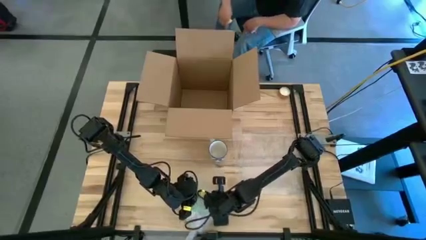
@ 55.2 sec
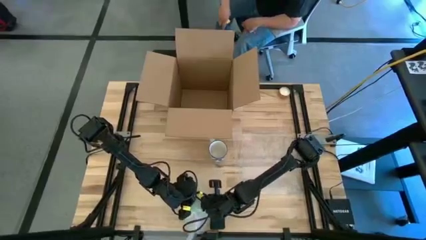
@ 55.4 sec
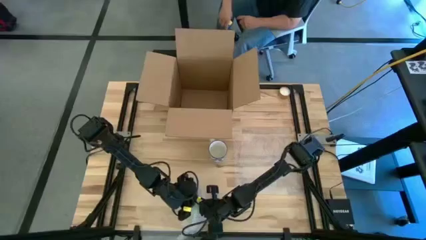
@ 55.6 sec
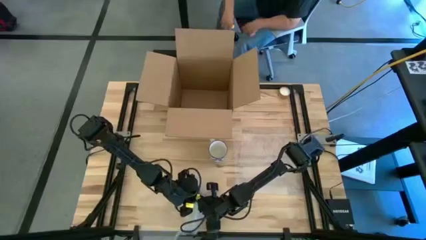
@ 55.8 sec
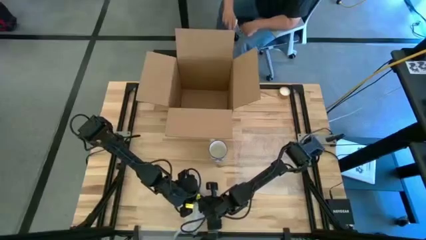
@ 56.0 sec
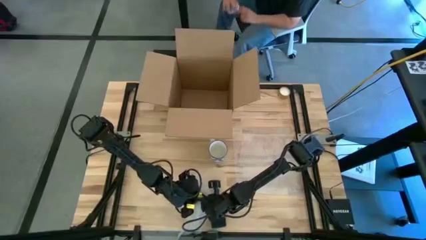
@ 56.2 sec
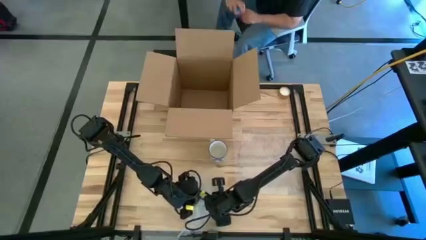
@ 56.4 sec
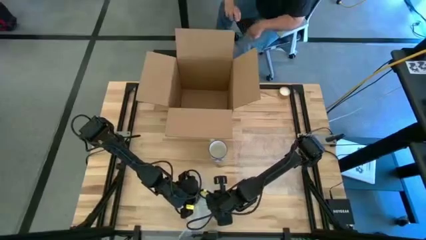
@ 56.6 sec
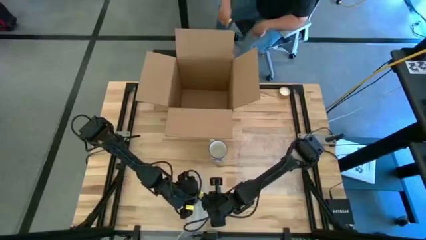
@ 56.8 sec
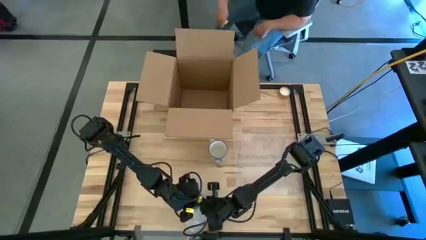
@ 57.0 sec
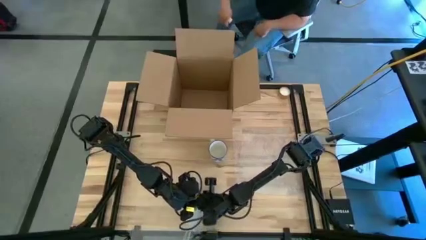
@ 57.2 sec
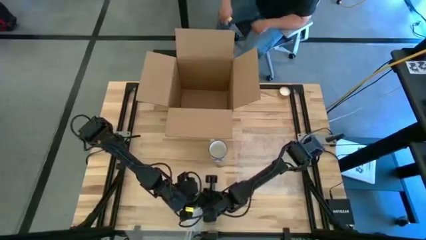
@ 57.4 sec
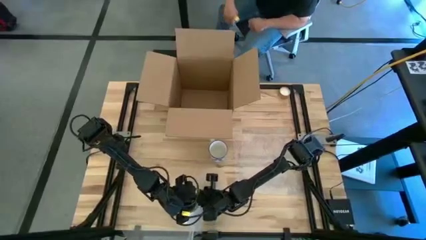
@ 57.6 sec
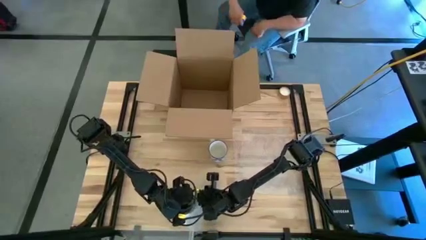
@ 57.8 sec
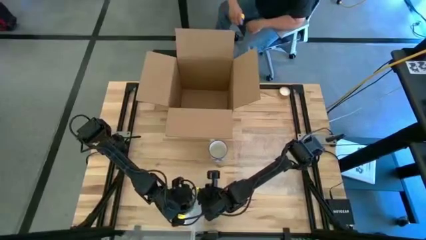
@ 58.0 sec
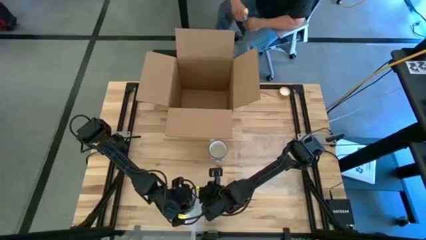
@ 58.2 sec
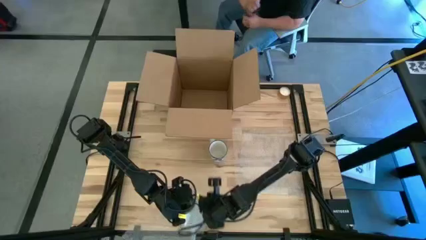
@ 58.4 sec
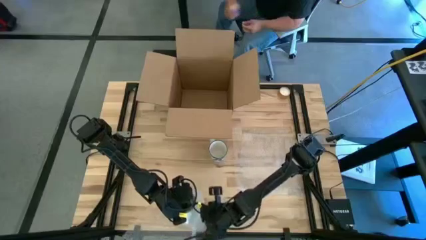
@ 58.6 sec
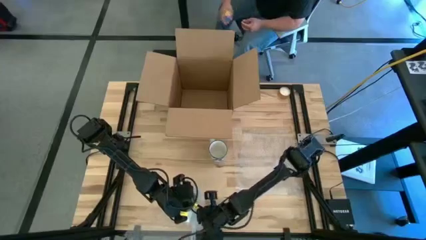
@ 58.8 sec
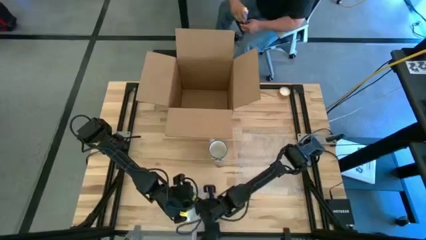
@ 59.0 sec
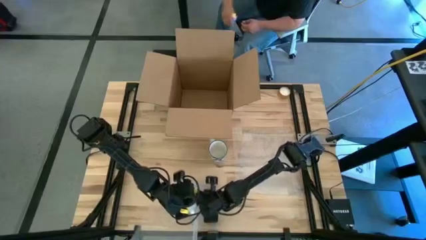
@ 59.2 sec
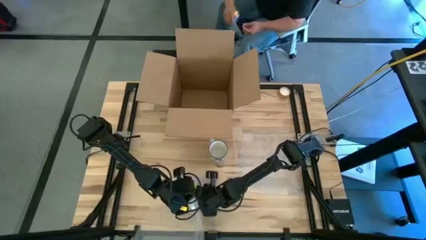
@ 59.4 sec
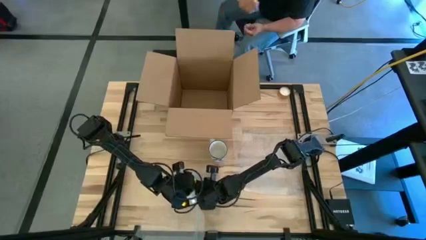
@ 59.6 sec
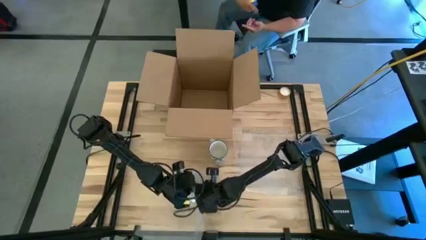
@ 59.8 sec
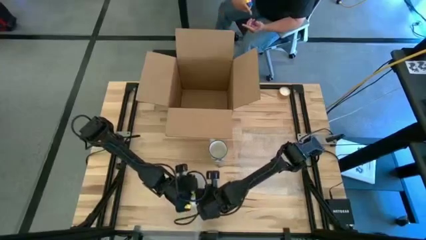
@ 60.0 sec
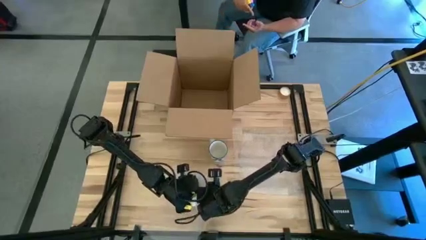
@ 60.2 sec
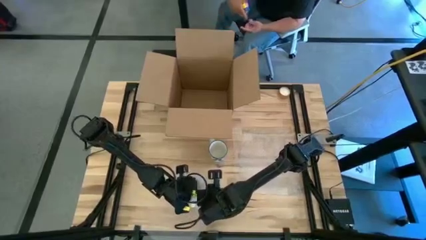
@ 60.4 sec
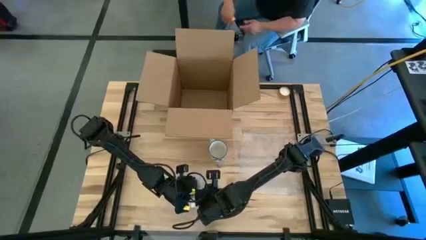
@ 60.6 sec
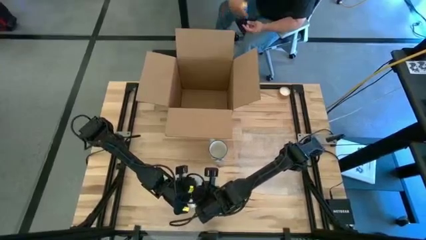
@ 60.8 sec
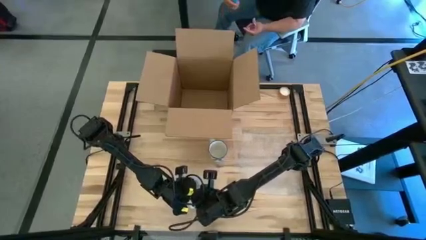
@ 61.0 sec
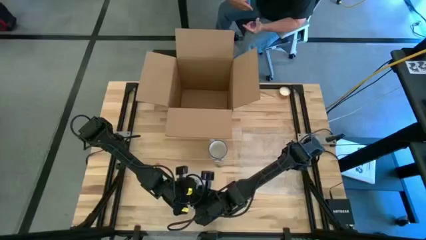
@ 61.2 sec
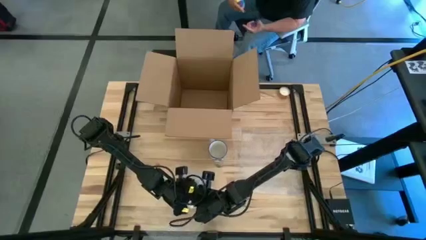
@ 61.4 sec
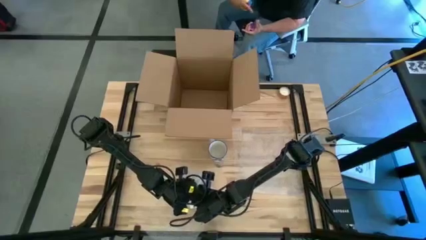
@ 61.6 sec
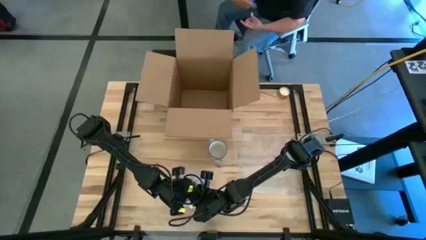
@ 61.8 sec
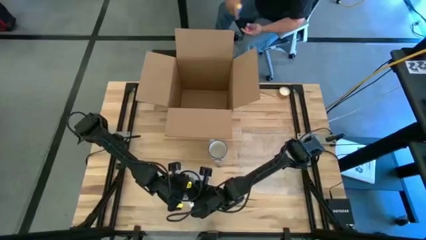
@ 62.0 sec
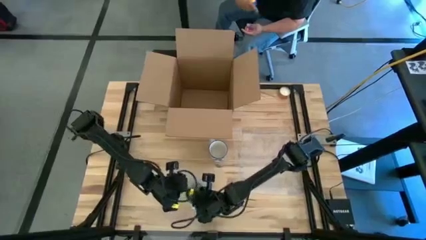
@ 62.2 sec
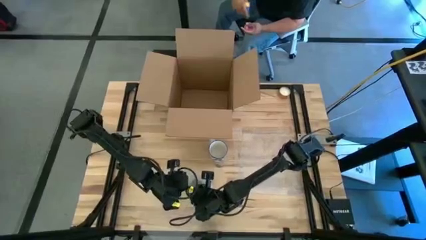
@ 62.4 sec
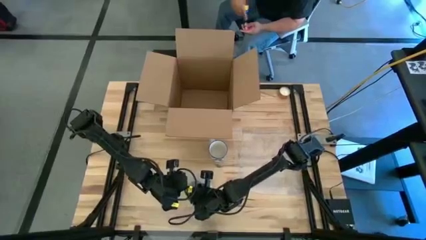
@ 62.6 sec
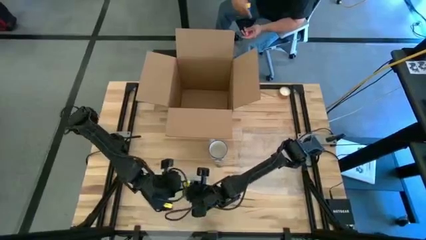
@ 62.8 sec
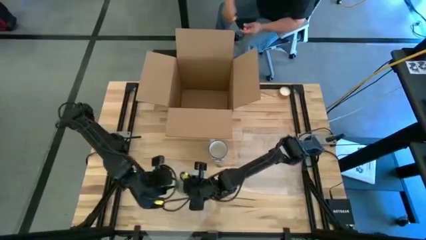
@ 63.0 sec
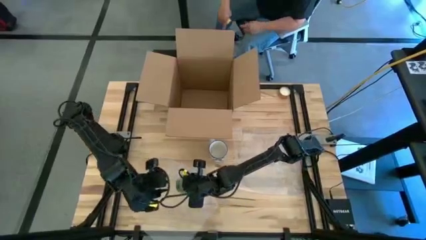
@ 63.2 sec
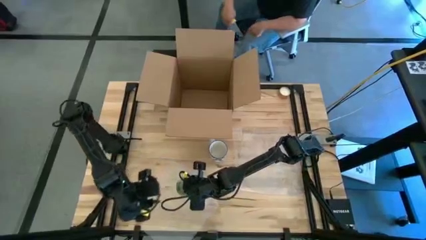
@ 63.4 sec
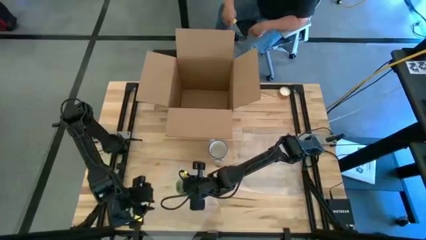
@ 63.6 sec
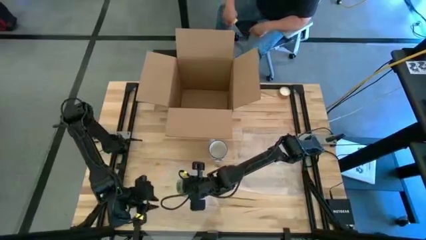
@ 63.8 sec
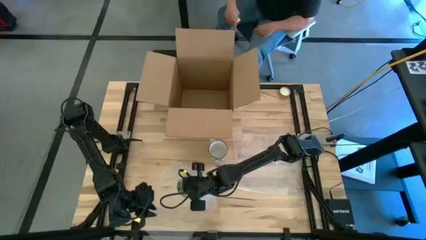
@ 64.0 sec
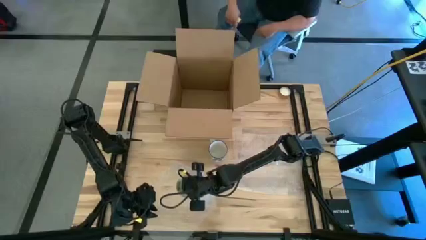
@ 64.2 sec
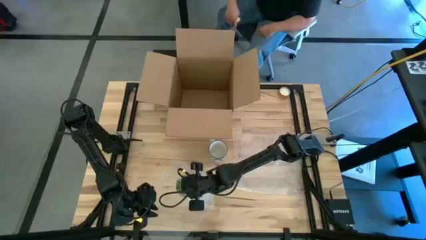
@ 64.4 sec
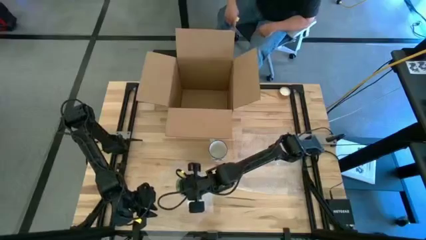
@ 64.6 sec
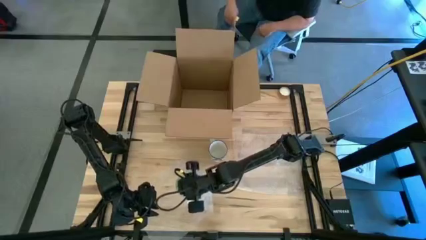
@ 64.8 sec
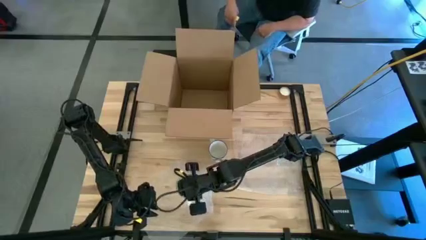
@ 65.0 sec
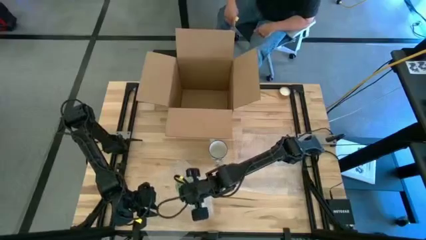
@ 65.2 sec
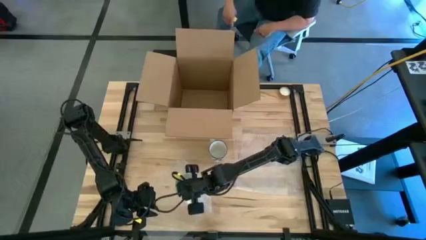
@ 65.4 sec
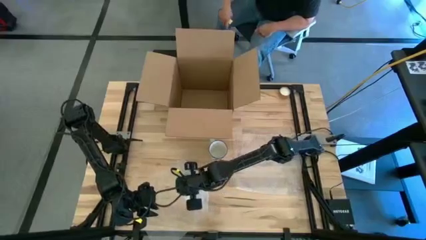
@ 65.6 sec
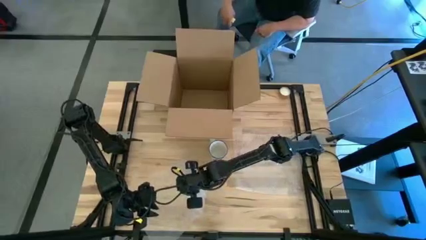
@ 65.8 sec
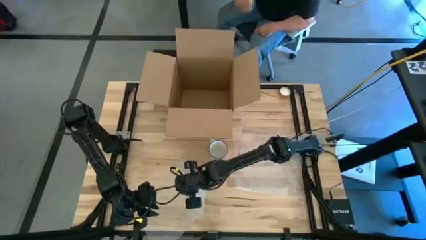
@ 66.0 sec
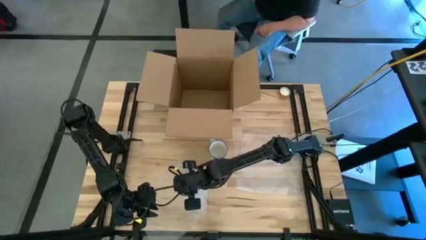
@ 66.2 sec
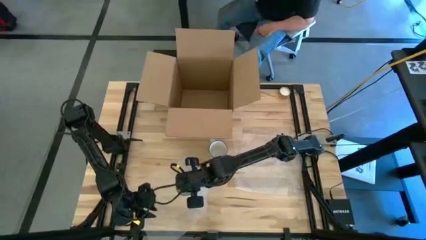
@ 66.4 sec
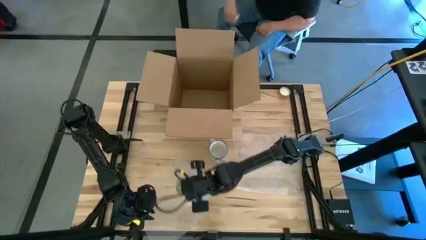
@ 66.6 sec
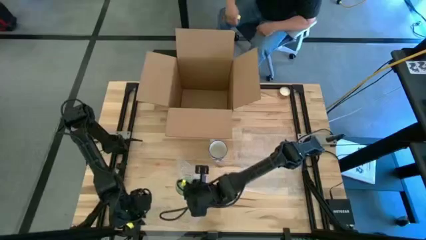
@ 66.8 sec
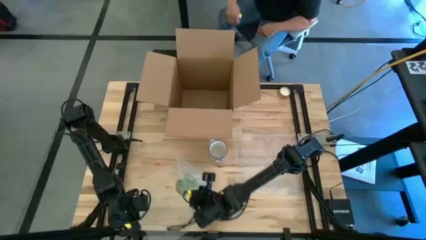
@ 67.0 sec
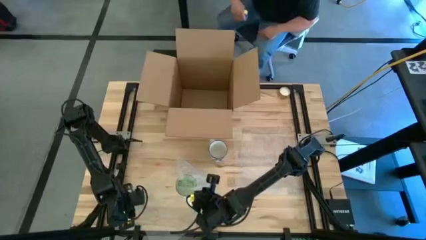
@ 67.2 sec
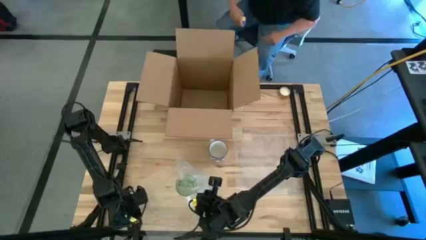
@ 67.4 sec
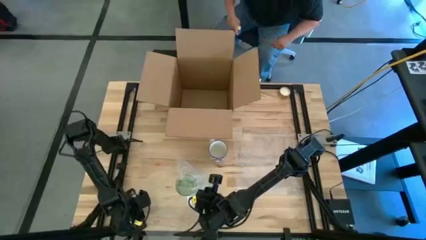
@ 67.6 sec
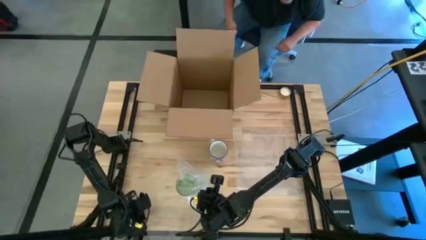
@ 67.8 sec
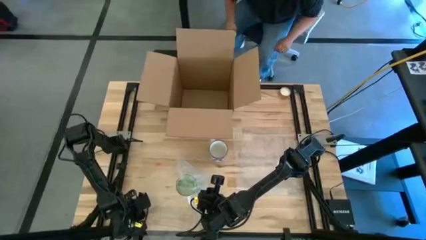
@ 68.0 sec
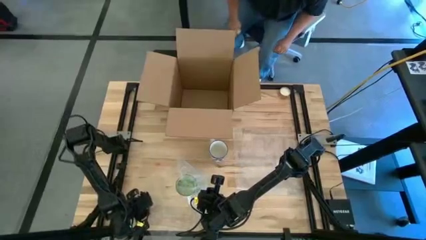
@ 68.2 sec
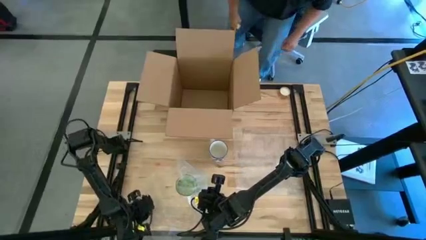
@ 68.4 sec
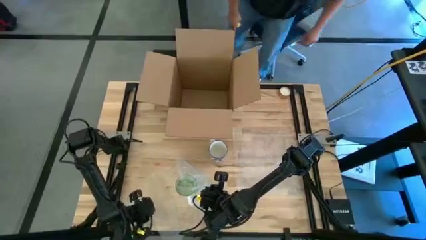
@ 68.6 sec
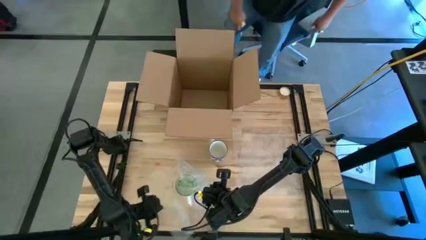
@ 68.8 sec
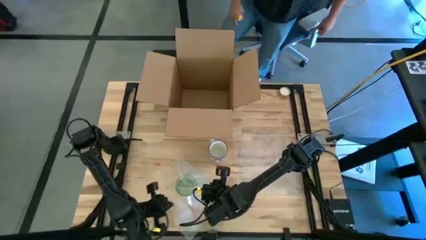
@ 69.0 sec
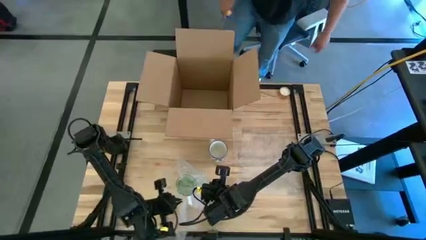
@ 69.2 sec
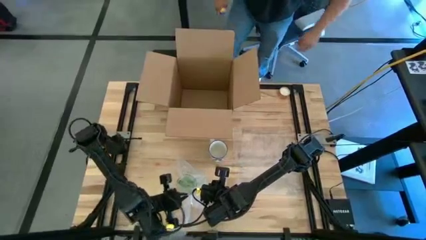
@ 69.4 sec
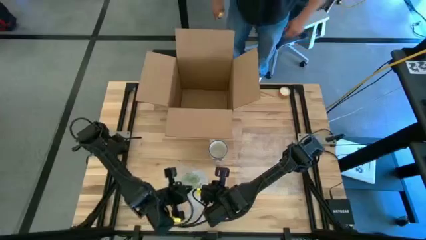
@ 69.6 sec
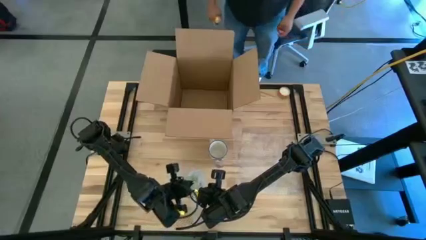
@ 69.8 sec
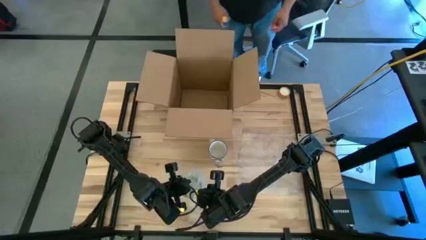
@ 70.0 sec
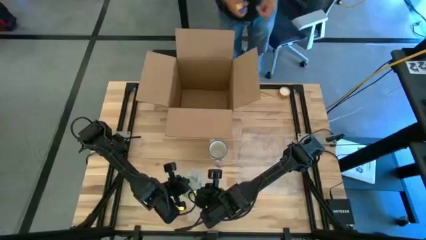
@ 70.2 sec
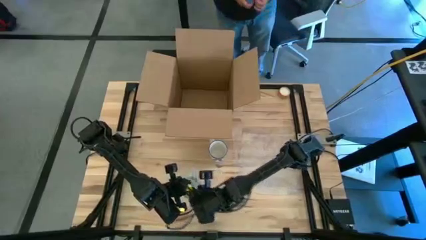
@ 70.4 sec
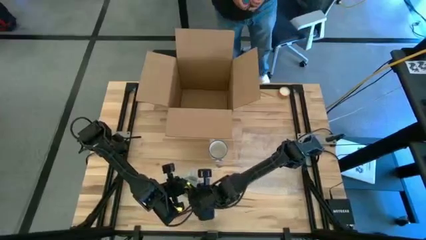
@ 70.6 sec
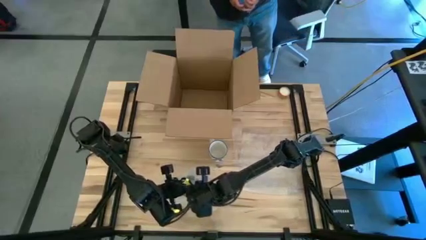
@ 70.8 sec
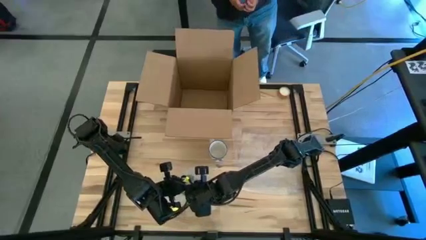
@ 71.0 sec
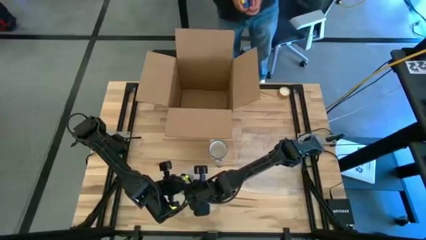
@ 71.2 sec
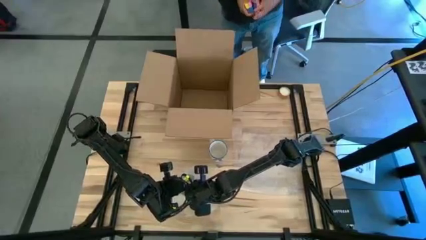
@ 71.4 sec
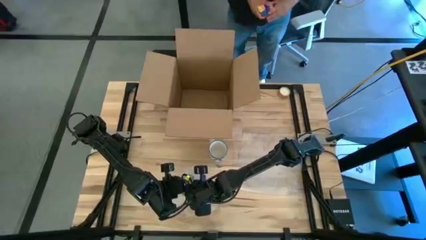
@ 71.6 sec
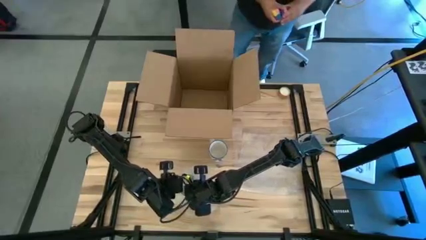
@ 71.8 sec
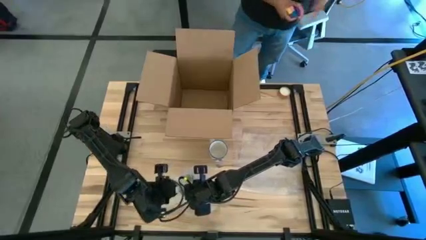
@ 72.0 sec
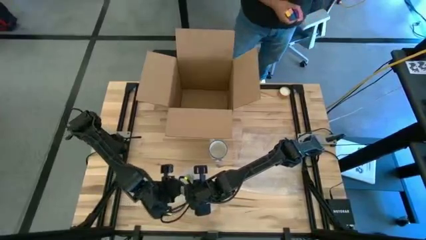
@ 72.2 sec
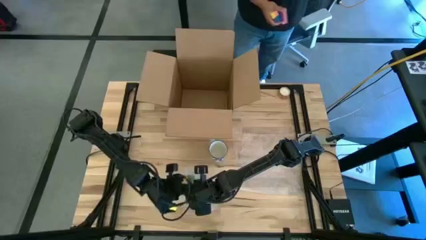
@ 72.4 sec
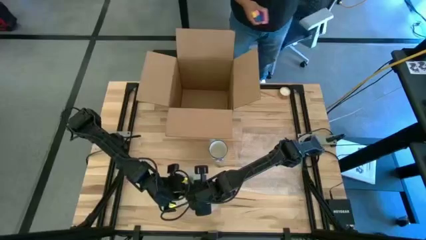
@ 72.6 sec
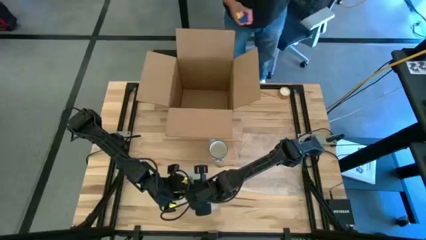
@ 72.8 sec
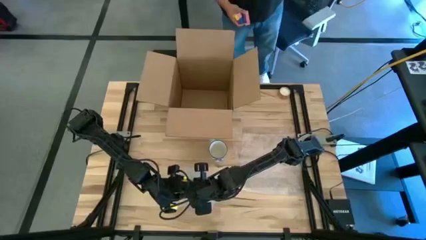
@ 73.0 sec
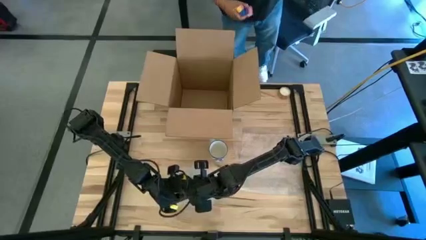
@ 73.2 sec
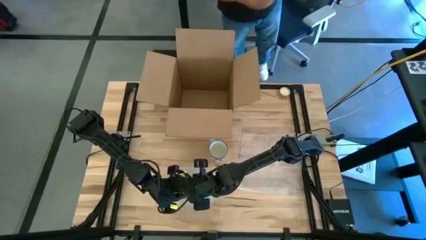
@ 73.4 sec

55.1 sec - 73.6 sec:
Task: wrap mug
Wrap the green mug with the left side transparent bubble wrap
